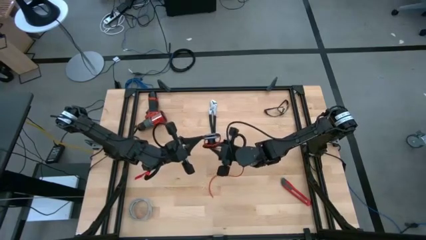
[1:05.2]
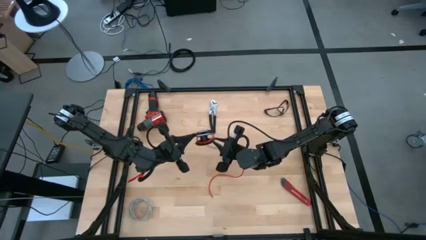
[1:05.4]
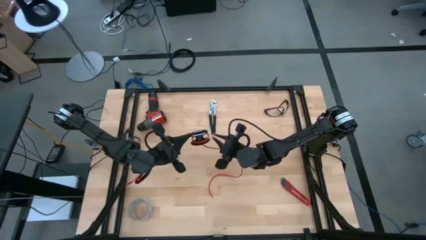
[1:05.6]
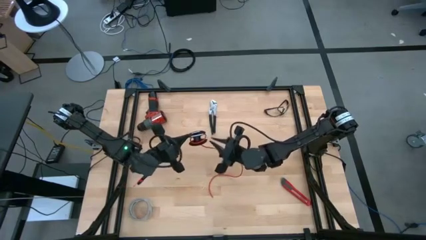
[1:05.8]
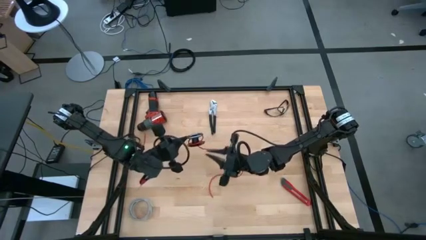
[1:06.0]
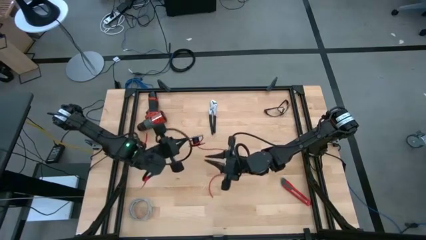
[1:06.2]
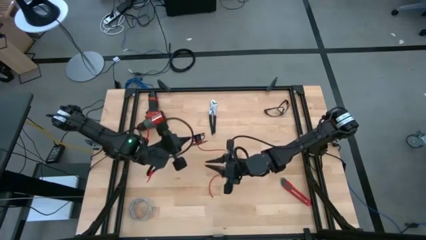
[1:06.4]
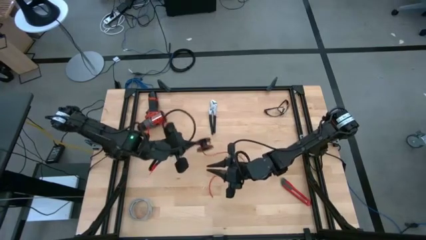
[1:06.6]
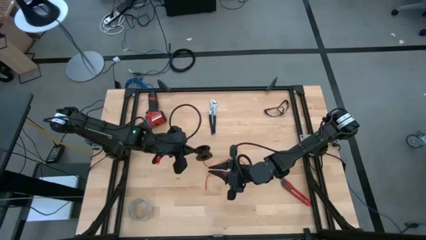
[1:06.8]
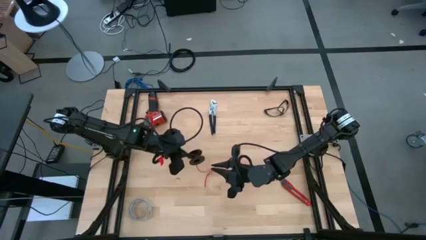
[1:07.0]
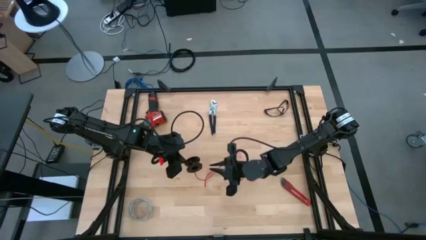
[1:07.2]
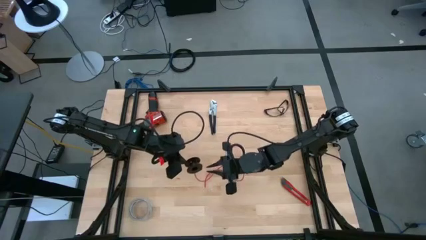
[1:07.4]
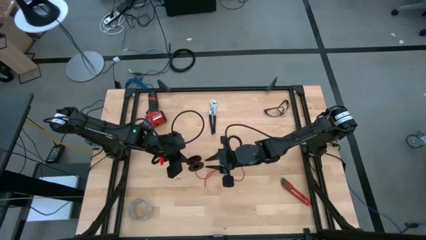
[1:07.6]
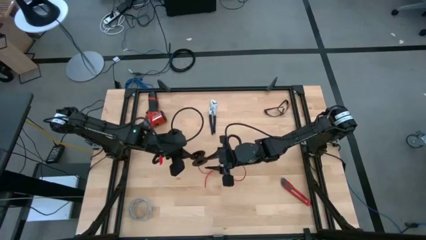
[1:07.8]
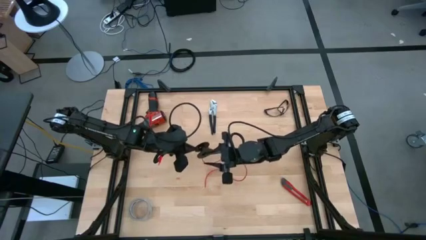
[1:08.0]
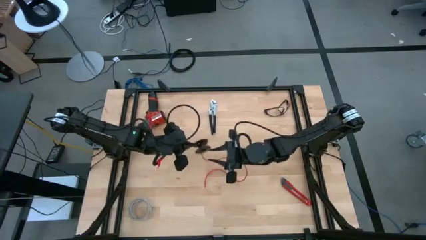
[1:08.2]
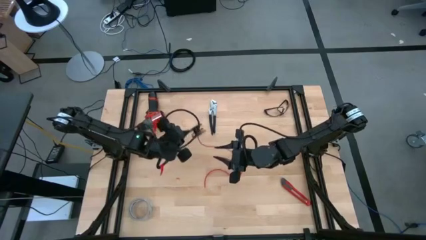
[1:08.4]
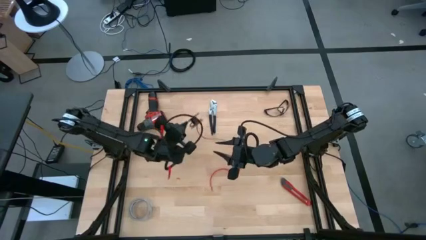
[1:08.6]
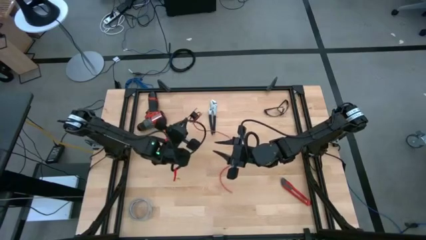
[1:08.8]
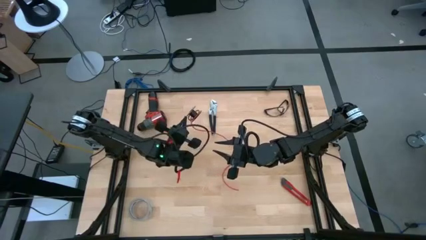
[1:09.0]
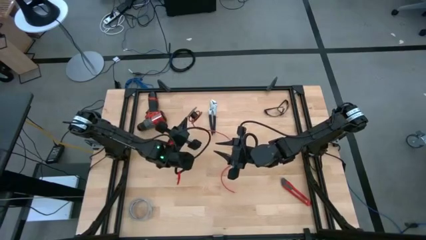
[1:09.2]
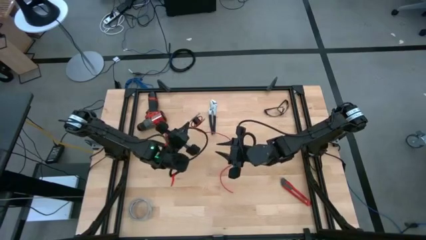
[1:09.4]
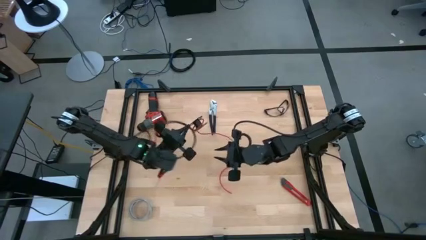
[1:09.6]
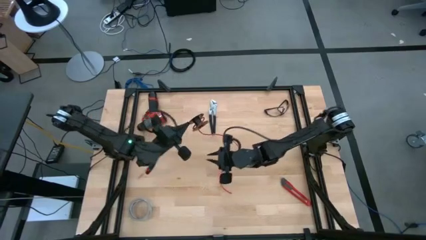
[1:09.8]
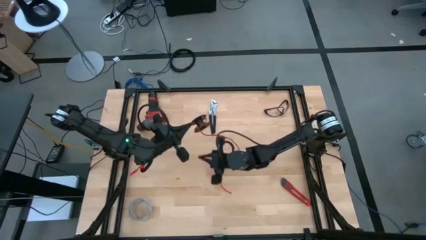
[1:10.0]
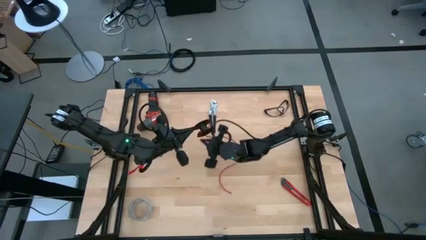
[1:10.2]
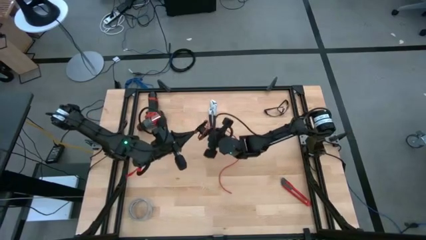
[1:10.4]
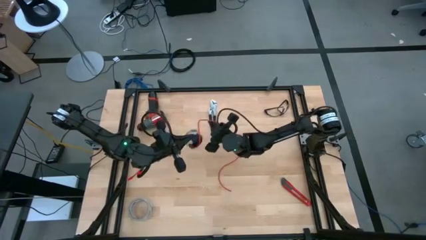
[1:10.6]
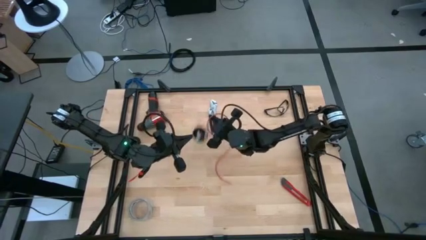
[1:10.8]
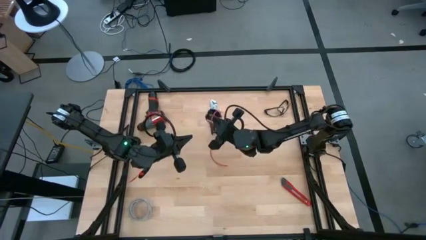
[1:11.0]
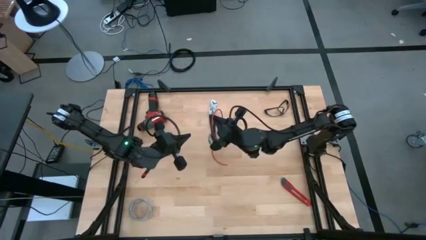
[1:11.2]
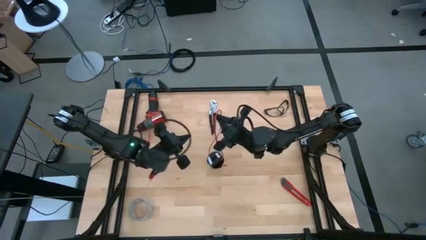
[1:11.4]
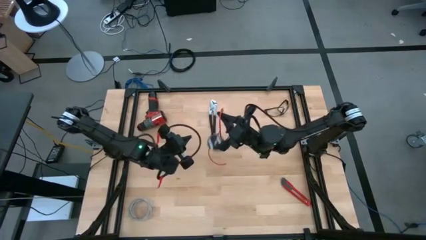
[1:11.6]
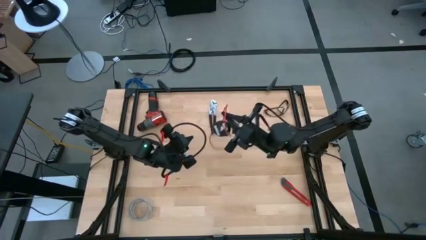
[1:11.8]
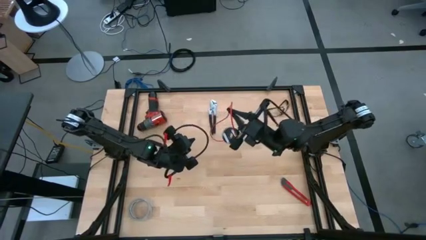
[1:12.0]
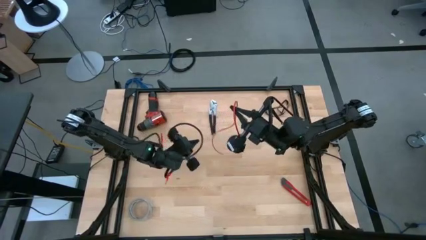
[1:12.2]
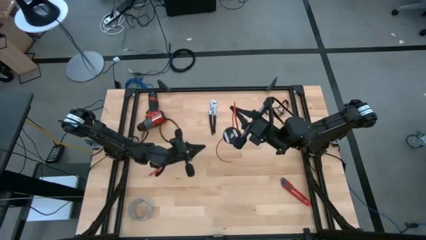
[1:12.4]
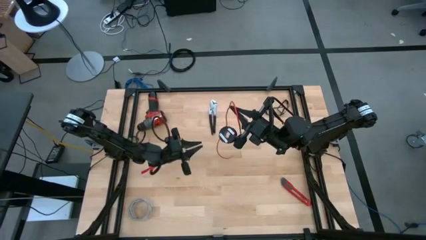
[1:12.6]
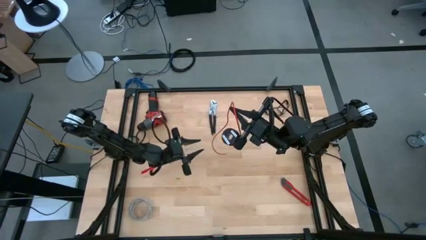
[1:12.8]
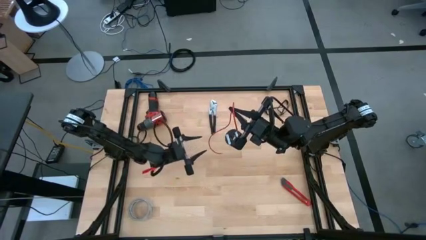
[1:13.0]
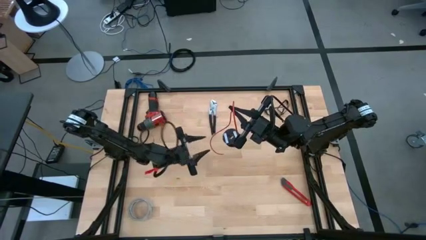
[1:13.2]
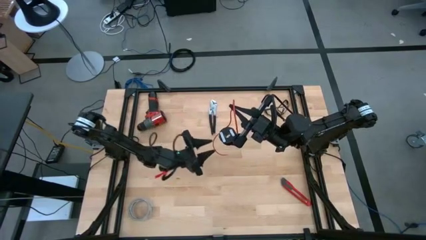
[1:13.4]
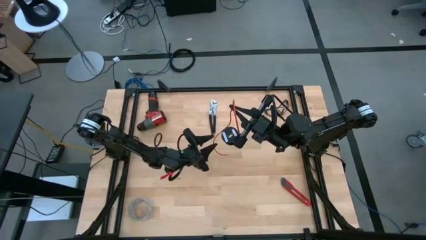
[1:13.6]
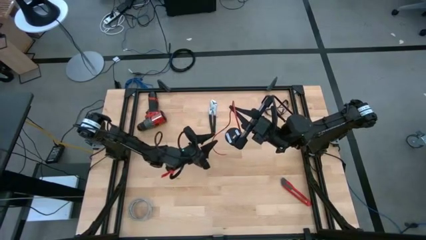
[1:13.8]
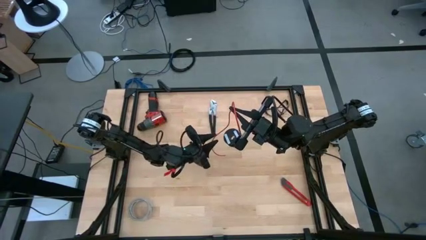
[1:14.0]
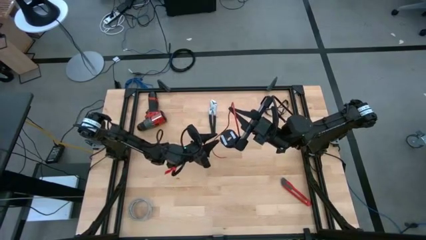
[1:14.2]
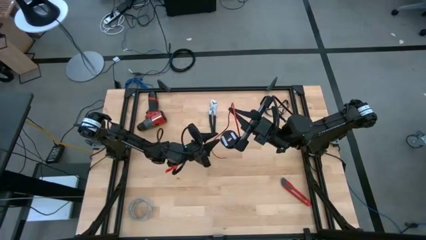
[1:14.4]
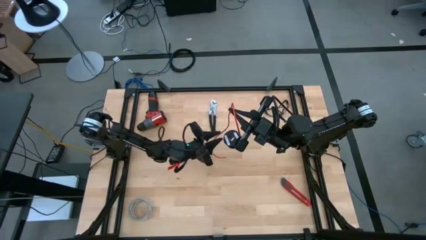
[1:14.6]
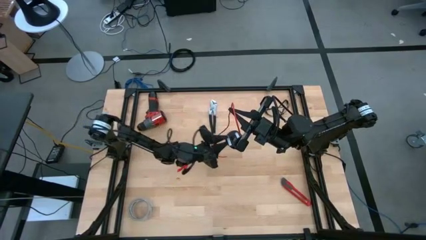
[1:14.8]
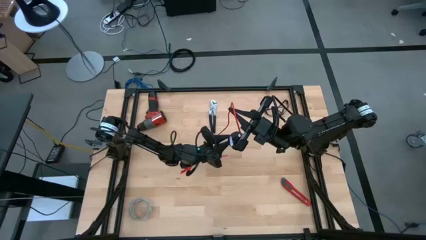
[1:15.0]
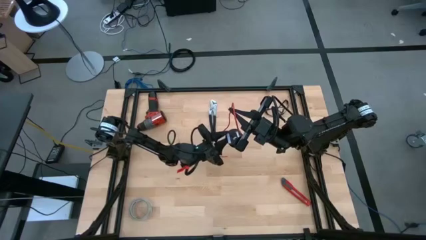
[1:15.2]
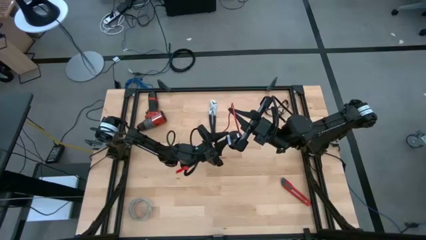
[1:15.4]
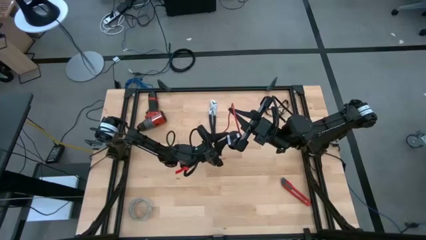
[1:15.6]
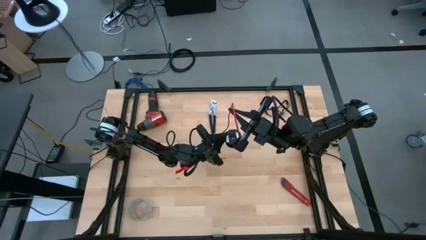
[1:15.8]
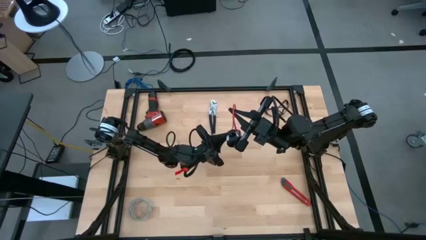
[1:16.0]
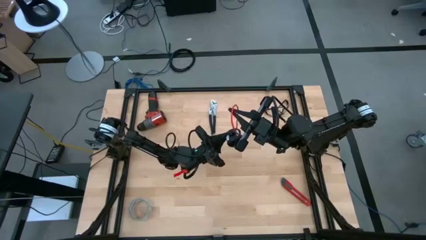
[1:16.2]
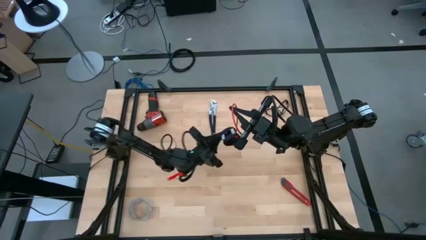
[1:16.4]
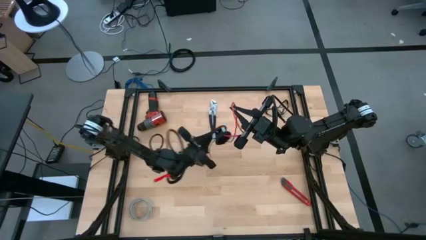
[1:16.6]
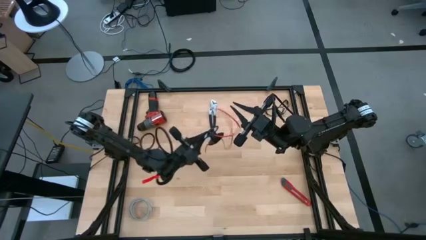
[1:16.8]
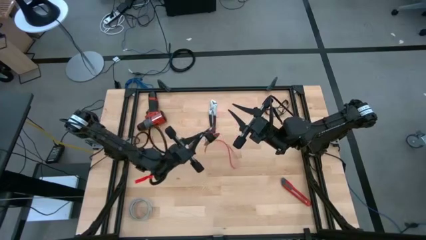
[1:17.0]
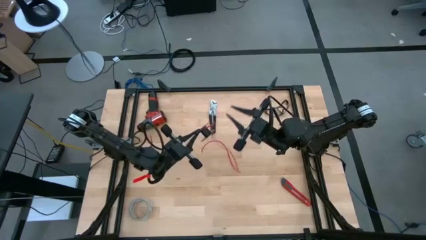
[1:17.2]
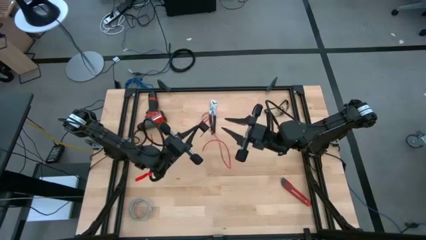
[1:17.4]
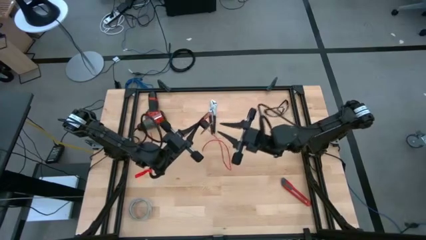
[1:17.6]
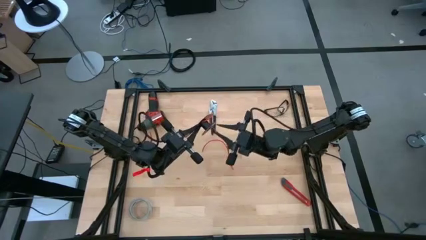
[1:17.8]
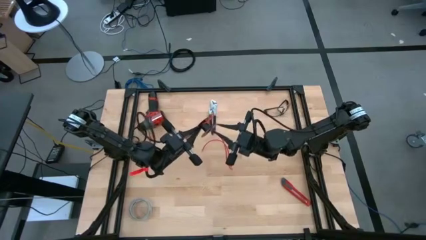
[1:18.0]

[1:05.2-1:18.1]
Task: Coil cords
Uncoil the red wire from the black spool

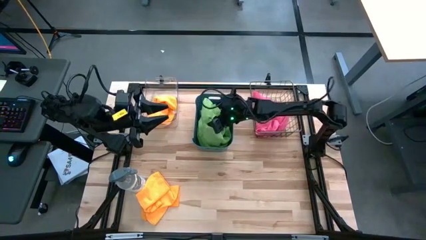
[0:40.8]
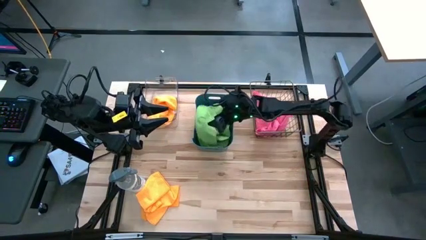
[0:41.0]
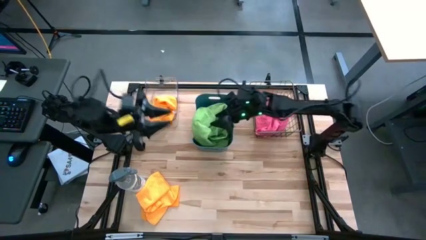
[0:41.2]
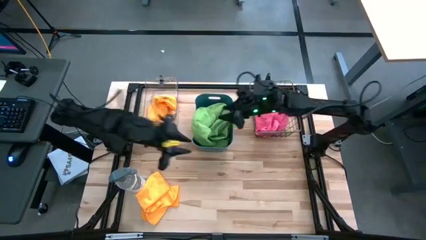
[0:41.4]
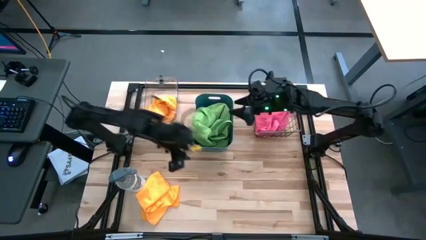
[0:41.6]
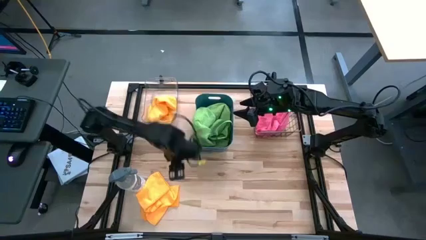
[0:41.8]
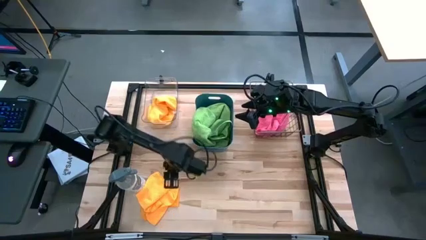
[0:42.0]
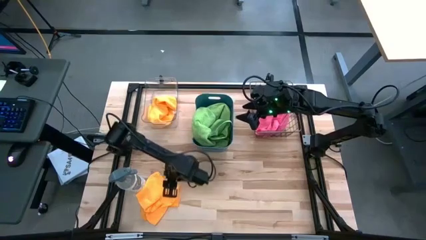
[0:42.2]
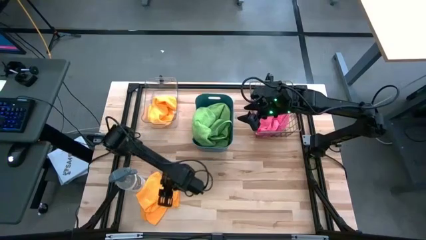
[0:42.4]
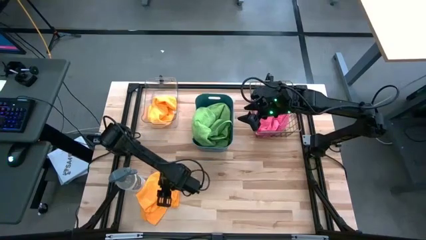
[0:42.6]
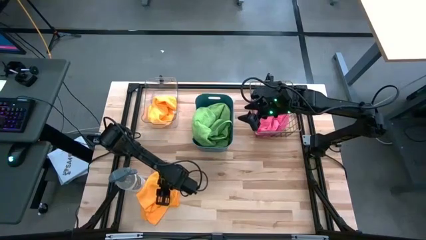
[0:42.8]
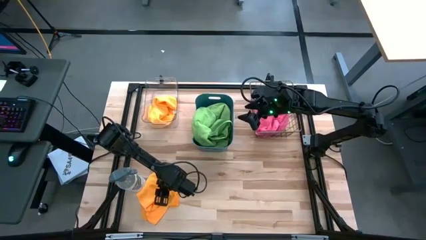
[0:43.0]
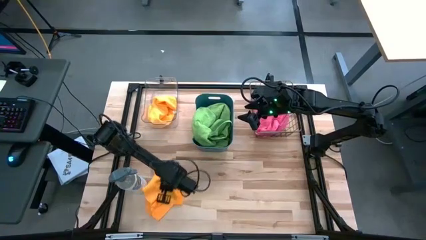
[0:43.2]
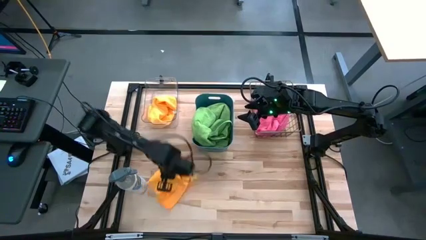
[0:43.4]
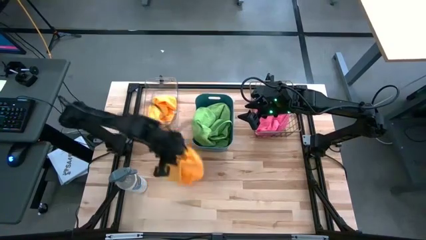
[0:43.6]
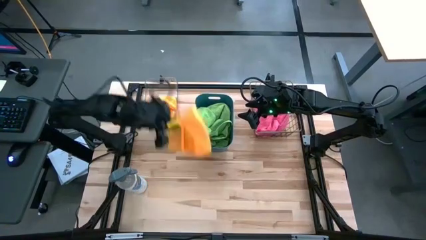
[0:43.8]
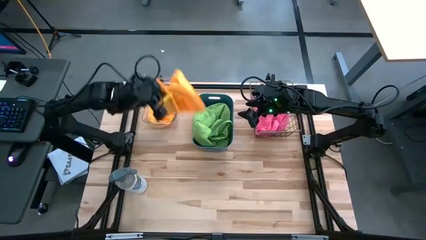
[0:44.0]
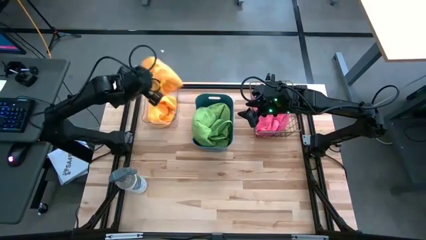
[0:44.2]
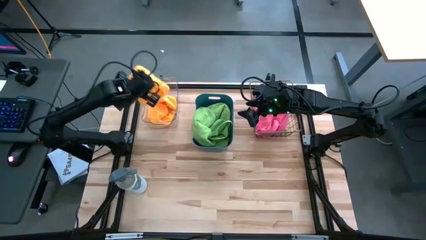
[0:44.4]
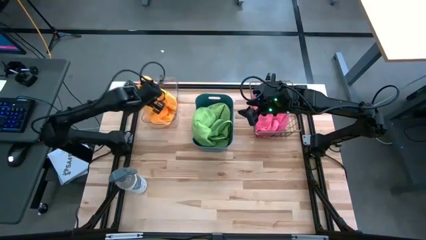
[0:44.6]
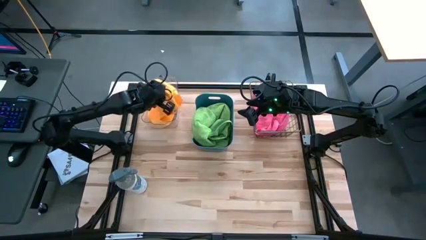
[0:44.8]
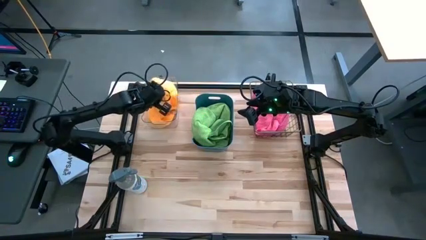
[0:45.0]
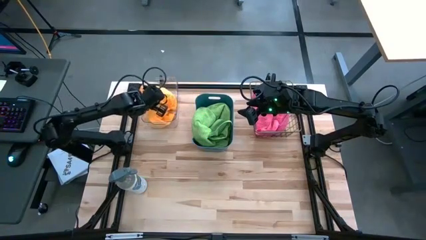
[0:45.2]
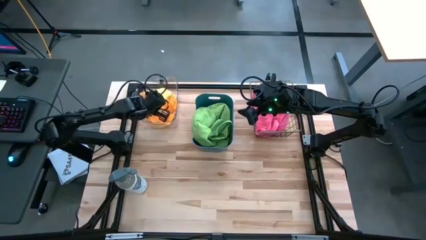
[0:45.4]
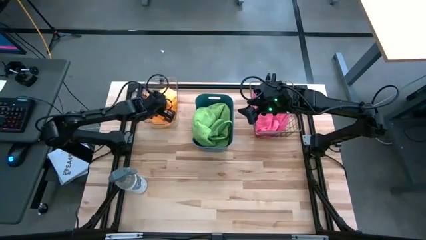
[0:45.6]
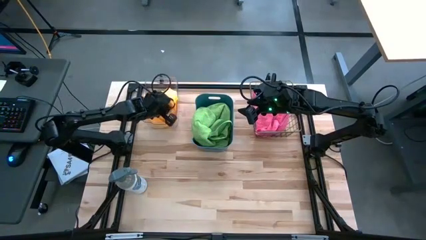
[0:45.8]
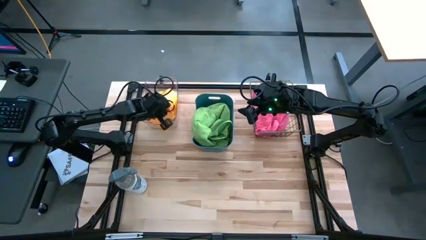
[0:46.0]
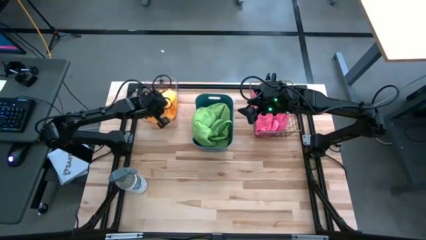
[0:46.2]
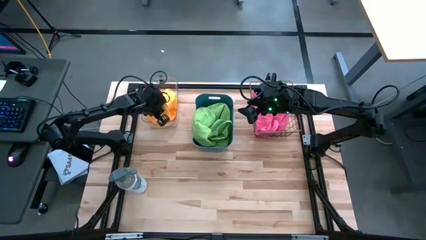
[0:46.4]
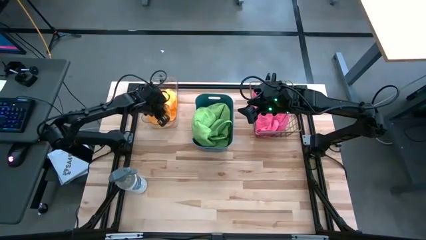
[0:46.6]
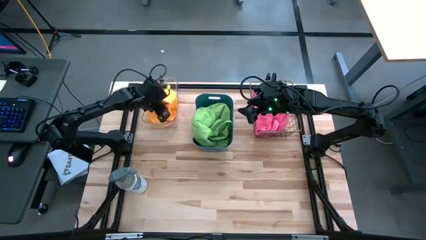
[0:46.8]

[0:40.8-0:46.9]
Task: Sort microfiber towel by color & place in baskets
Put the yellow microfiber cloth into the transparent bin
